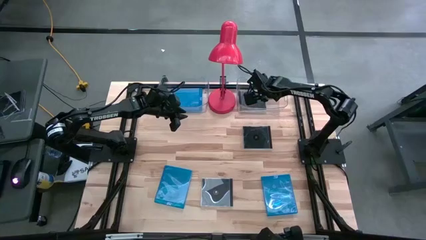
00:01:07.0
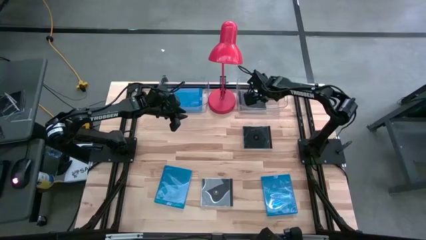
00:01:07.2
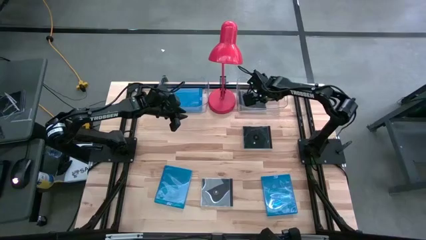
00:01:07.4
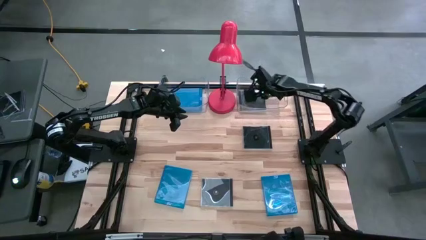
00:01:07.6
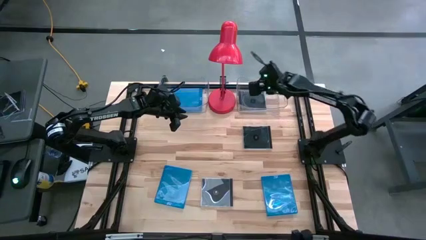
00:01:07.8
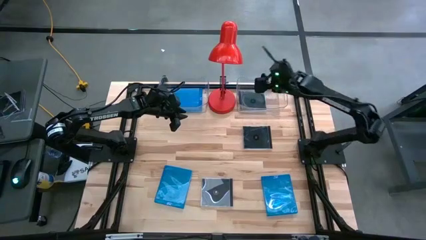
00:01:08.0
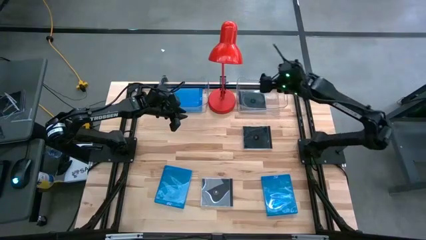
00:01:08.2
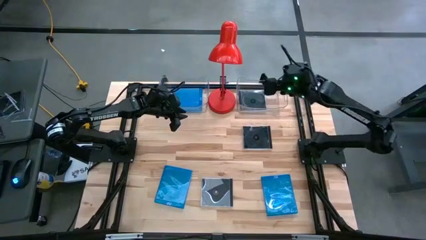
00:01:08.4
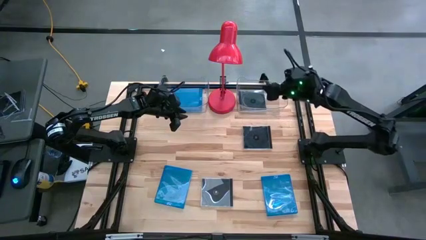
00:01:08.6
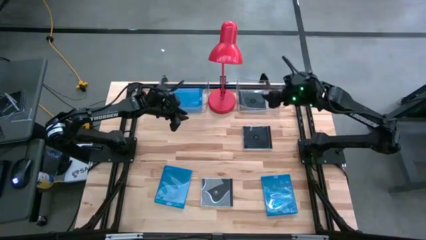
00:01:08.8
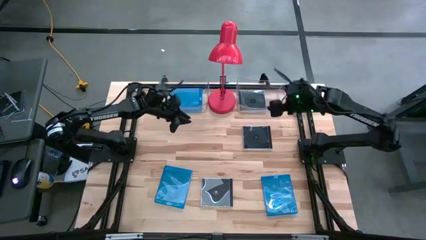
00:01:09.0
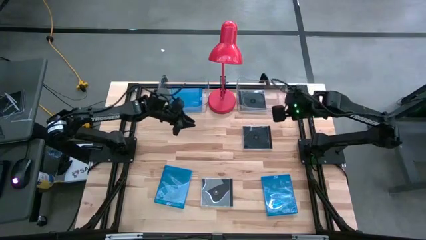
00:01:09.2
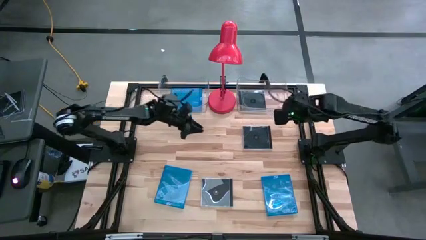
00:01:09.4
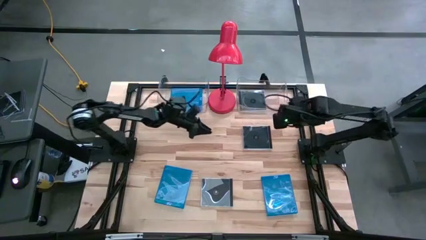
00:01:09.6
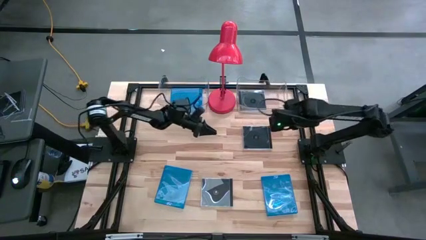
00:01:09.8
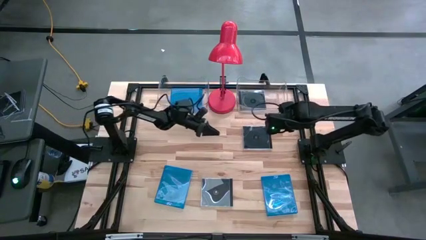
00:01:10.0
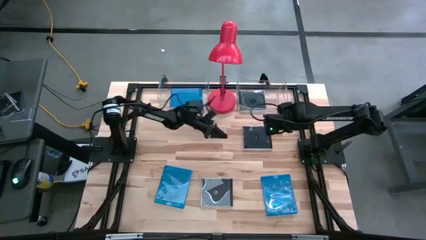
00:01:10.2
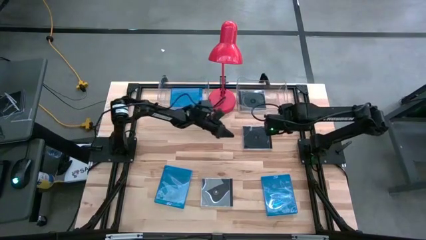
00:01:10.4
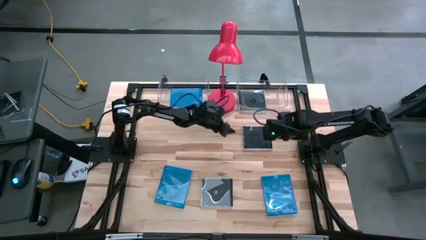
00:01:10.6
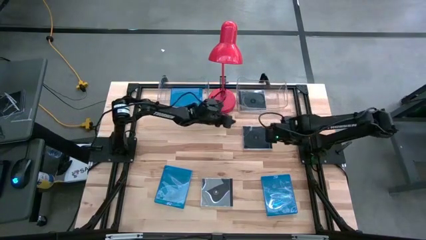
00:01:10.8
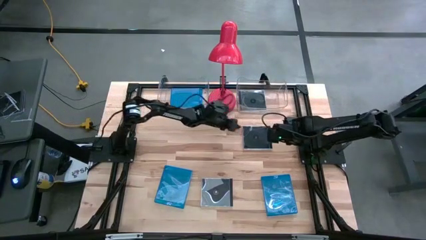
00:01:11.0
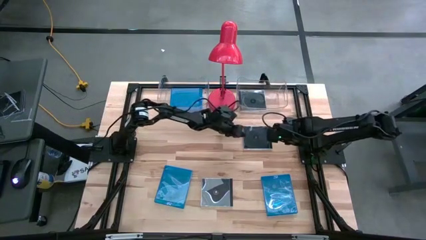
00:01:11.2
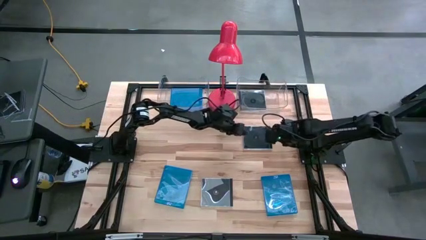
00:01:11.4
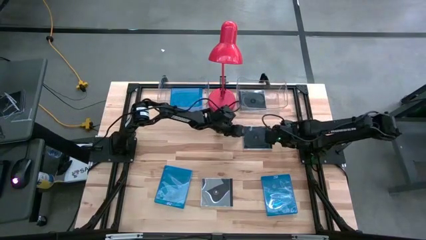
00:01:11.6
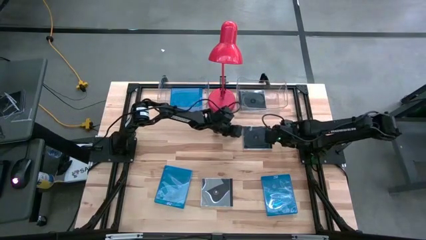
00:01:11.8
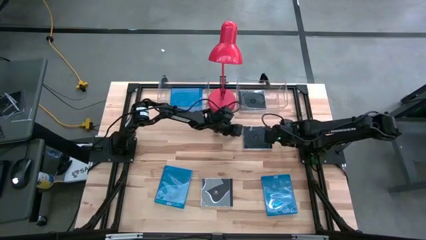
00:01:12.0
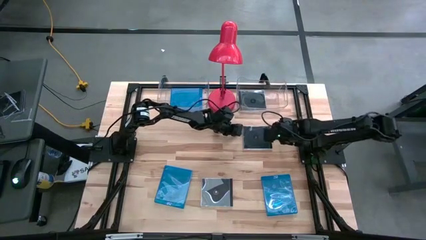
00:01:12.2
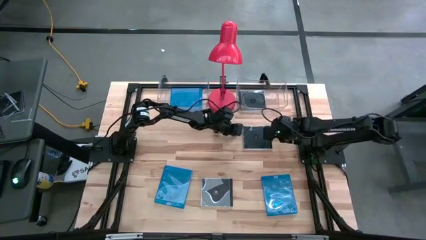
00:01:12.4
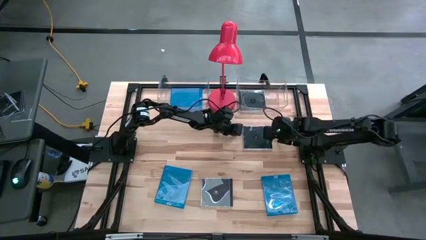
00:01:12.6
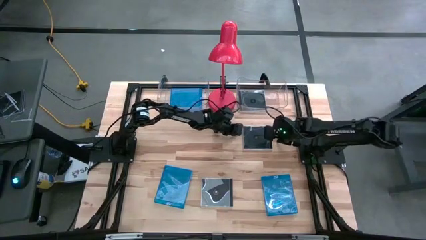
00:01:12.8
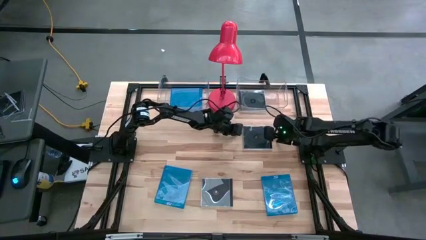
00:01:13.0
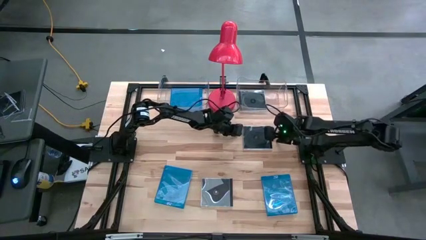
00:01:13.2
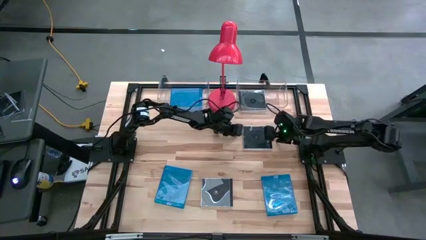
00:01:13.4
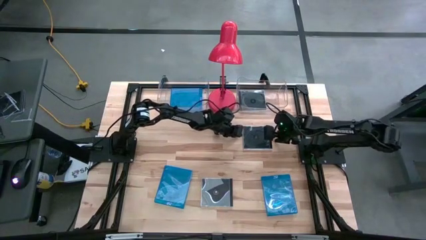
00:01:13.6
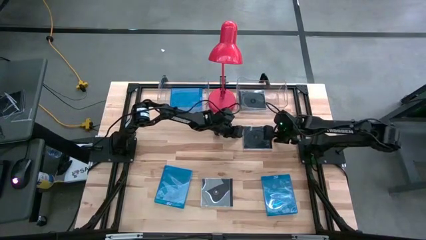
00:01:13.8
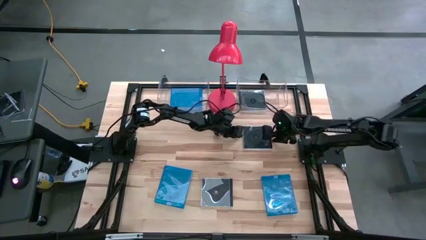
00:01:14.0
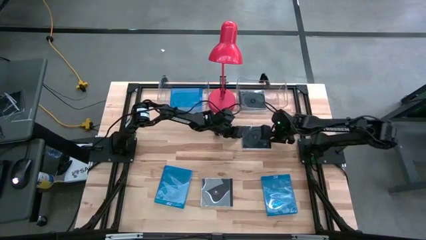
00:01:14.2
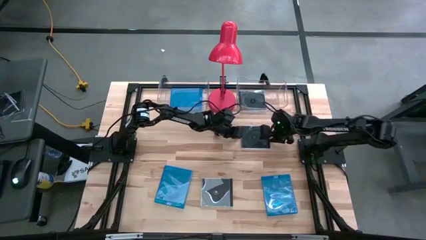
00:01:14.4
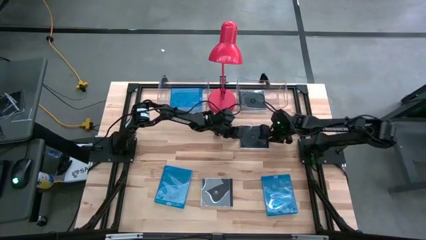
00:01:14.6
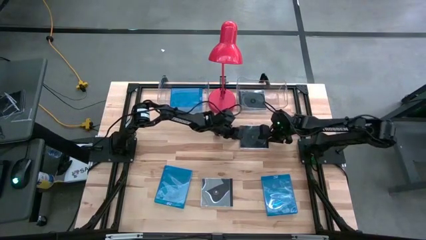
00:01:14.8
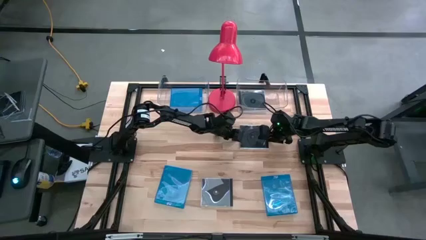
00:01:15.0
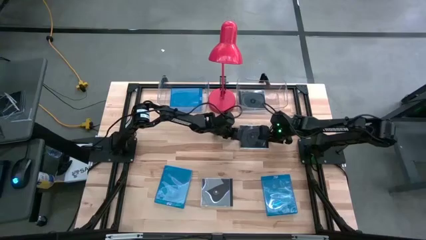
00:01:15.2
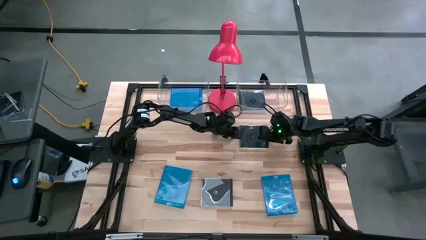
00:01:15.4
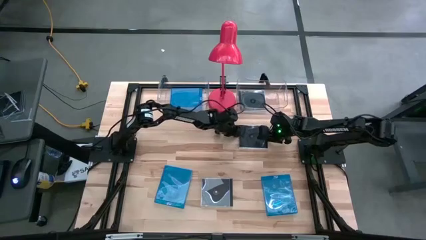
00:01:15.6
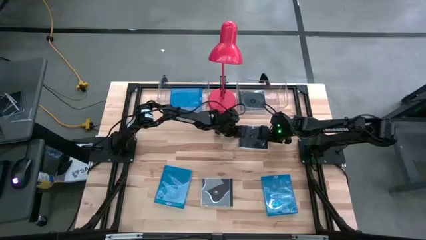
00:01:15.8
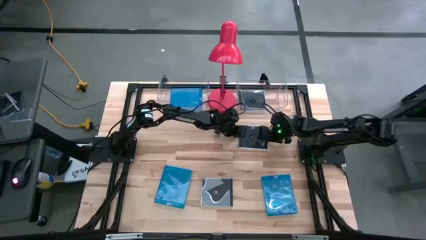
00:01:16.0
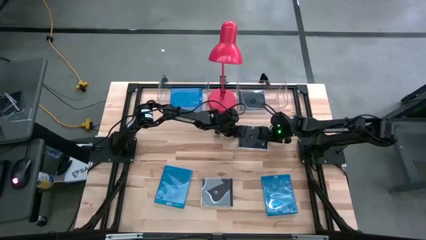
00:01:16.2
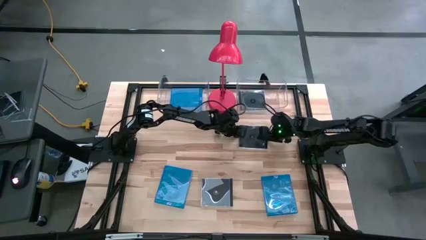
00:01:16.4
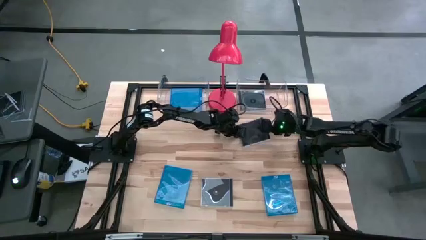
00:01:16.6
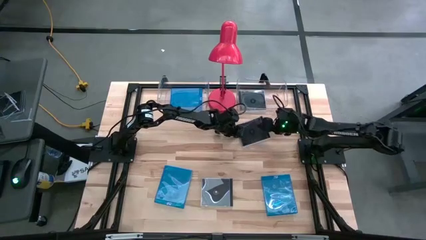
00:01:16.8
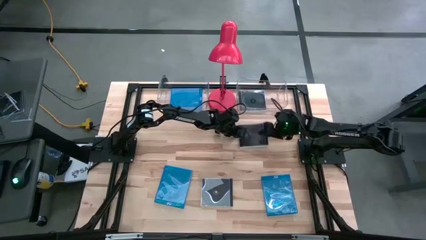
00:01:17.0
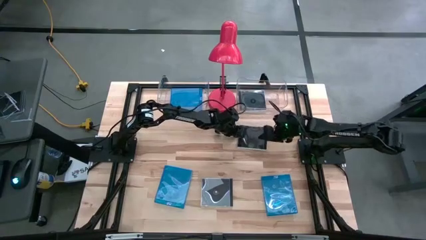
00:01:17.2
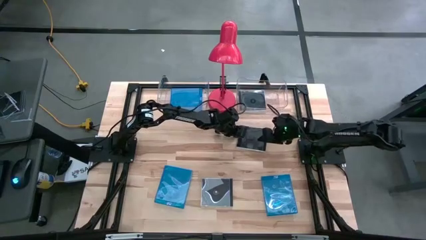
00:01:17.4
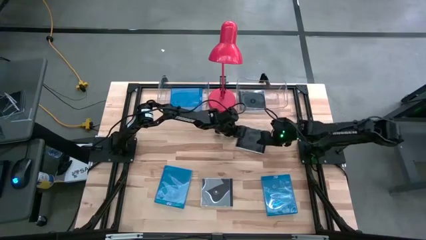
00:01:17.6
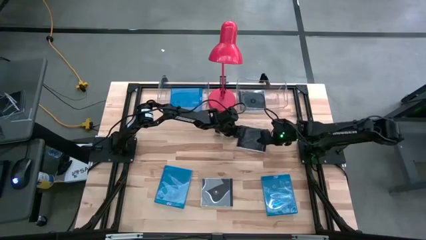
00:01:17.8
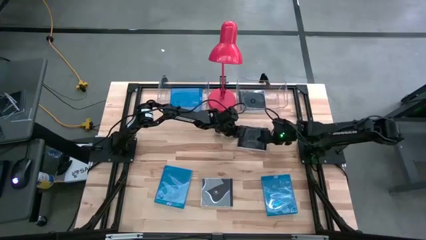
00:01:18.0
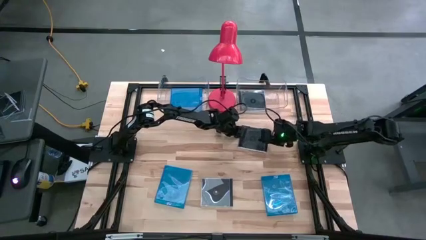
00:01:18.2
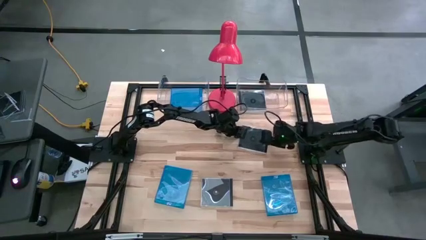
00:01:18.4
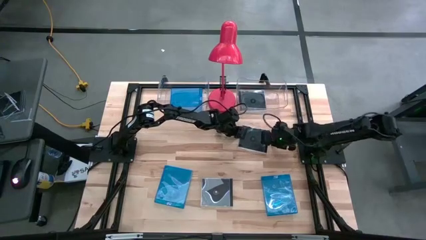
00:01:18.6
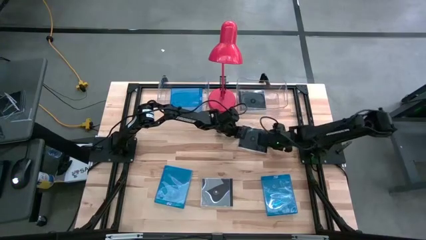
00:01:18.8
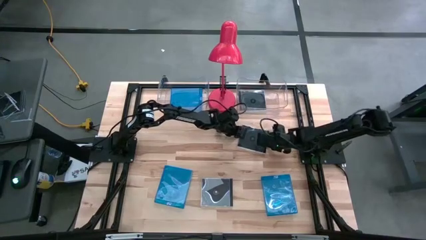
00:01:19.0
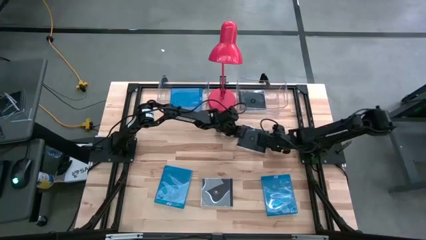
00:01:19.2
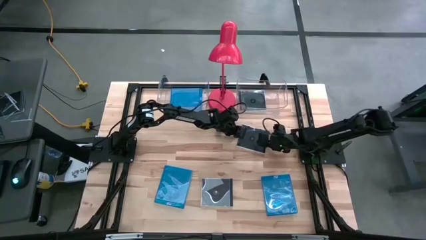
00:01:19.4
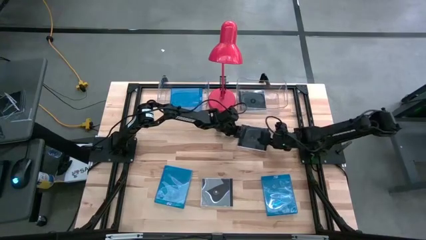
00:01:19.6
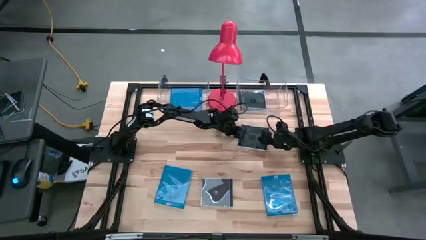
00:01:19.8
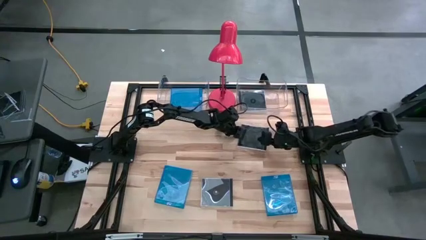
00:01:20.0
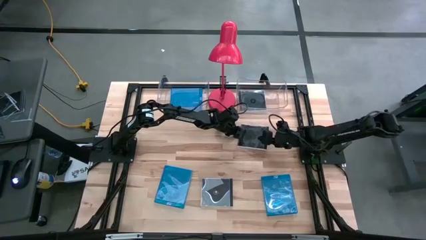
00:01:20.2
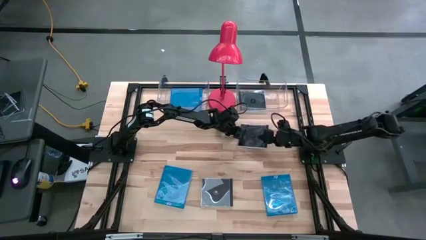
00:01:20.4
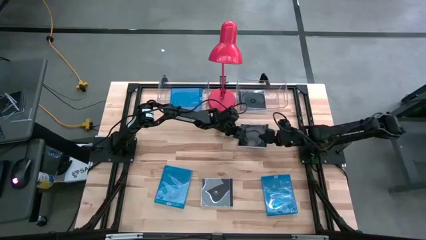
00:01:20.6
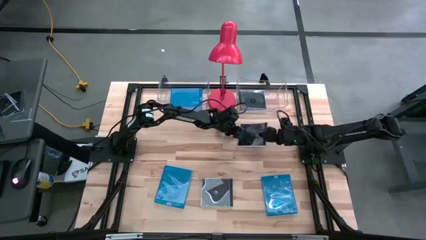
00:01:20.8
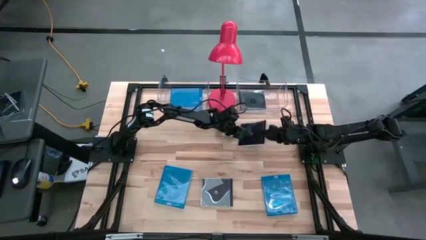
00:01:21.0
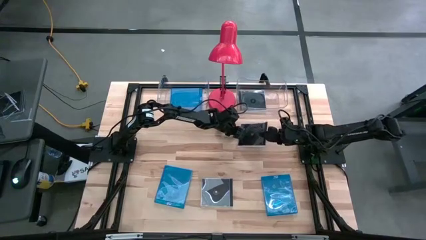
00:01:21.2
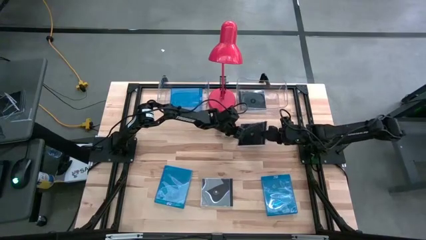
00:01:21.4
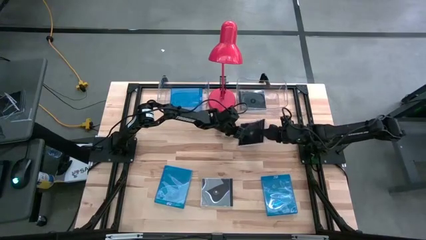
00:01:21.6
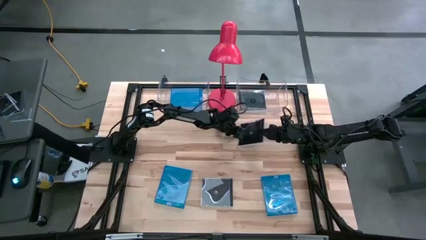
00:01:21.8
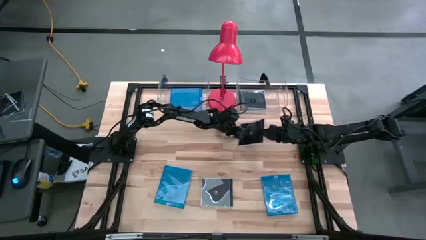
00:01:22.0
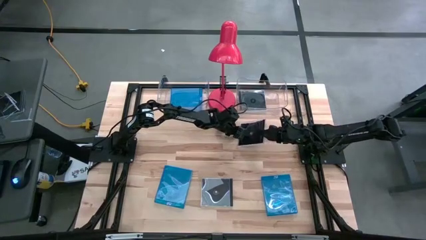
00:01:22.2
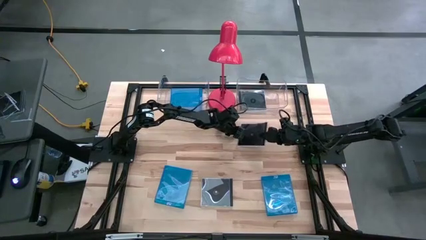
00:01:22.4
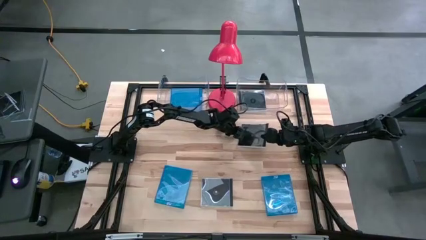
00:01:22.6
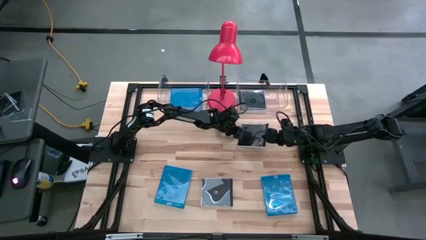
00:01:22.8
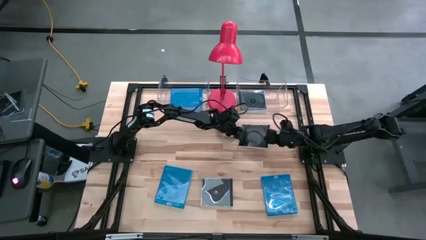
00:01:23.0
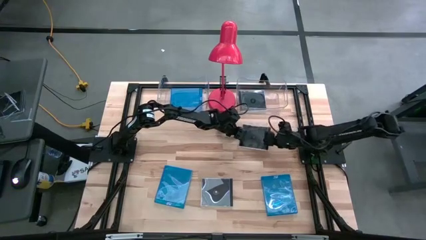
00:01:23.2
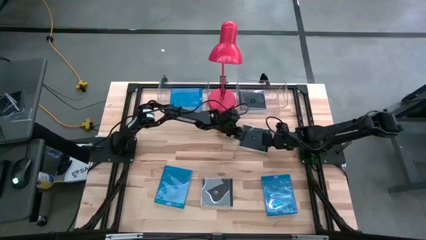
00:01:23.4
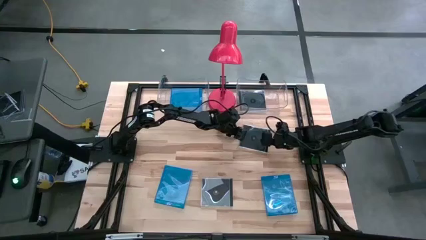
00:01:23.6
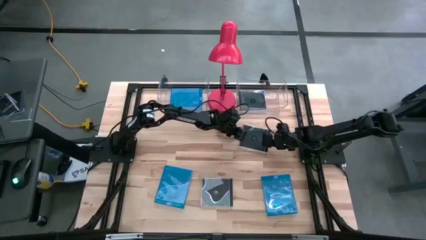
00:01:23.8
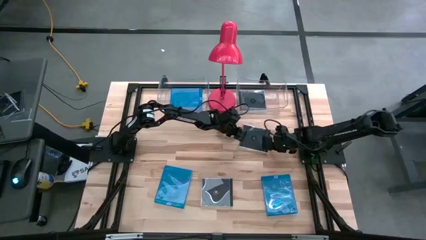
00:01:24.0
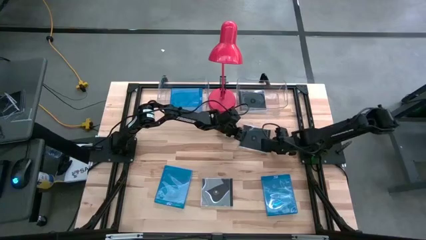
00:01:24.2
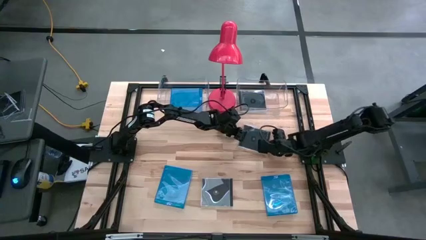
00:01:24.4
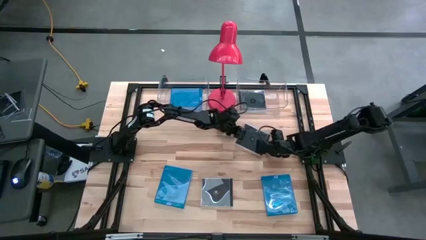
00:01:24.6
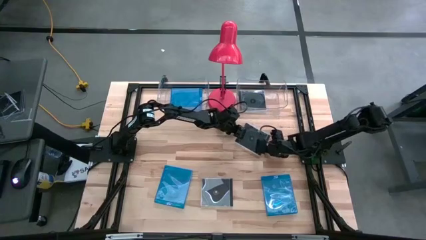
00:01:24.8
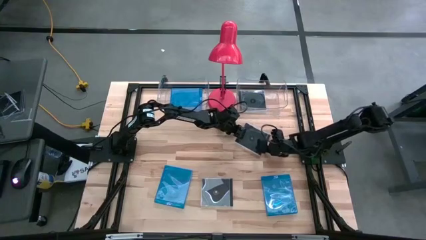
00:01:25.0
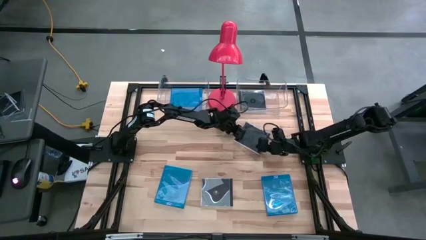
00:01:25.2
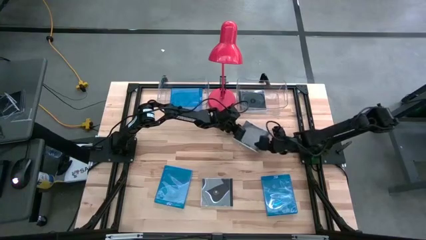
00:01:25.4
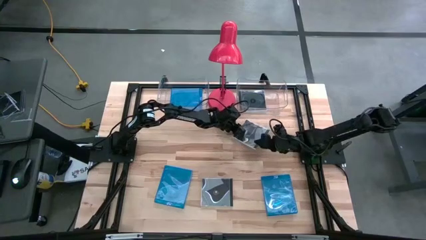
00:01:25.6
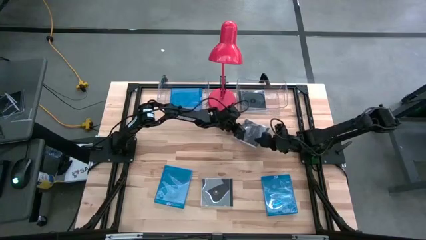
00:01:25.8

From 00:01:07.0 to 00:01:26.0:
Task: Pick & place jewel cases by type
Put the right black cd case into the right transparent bin
